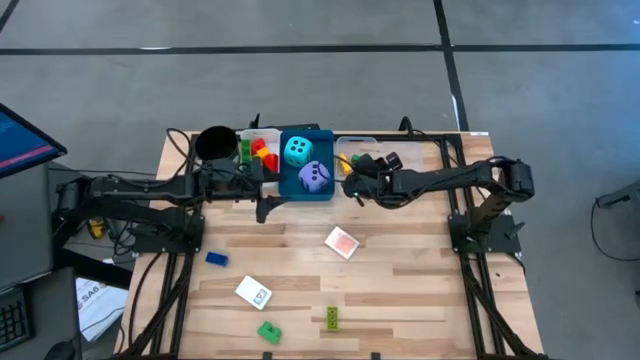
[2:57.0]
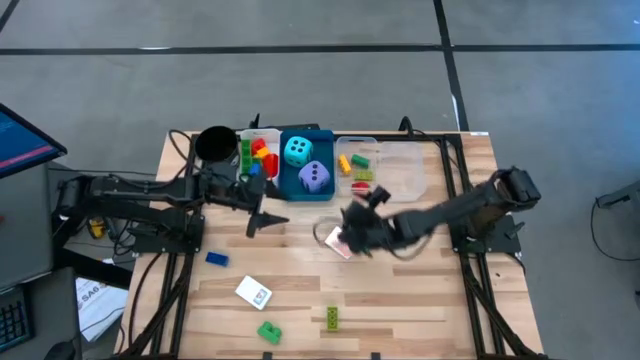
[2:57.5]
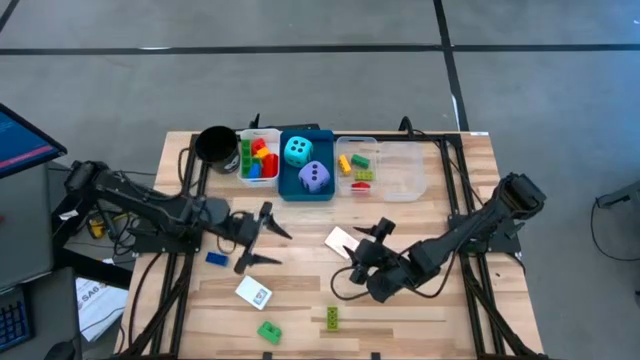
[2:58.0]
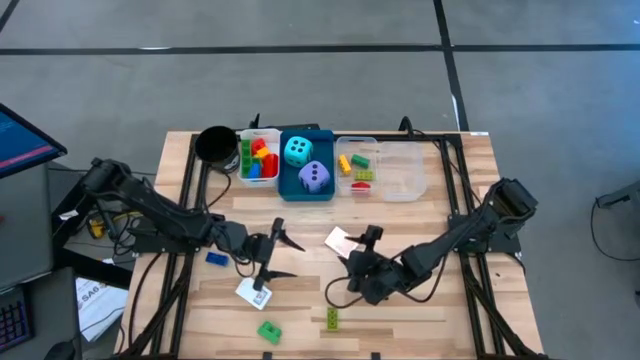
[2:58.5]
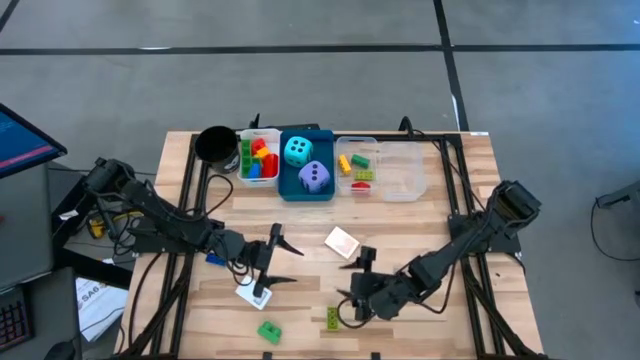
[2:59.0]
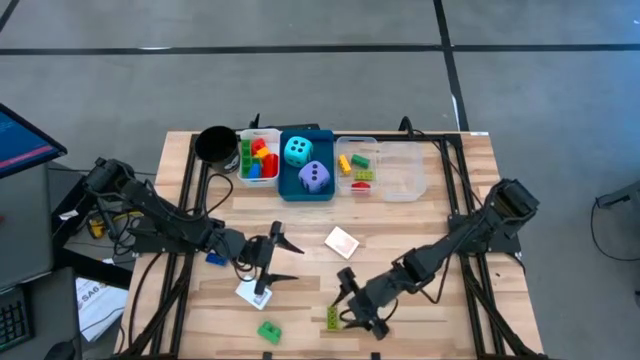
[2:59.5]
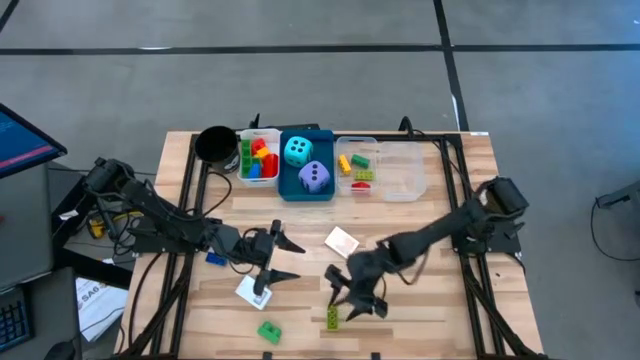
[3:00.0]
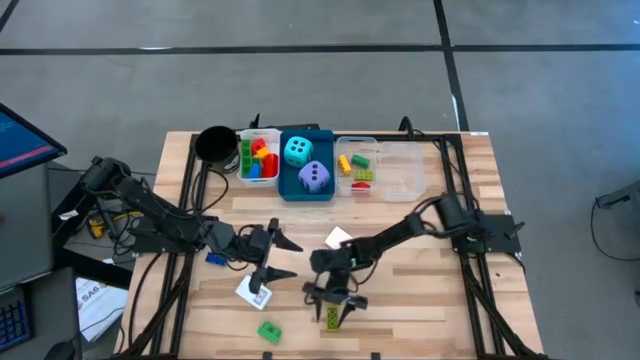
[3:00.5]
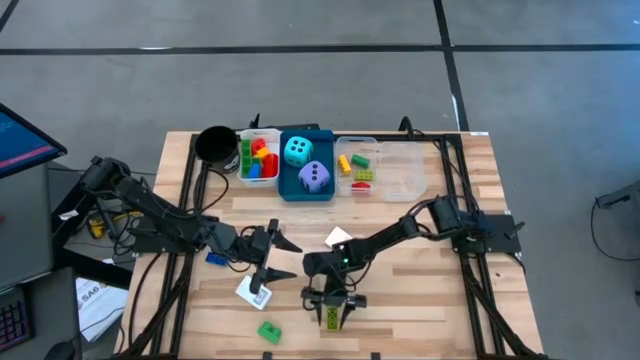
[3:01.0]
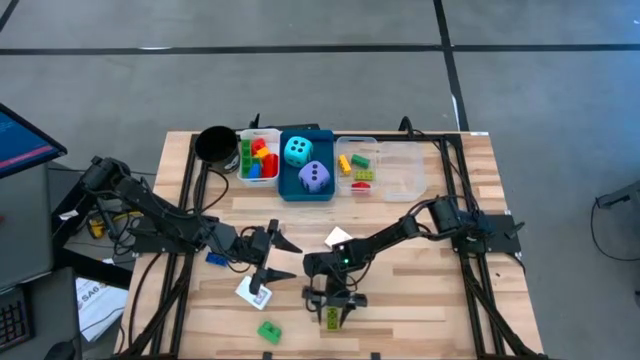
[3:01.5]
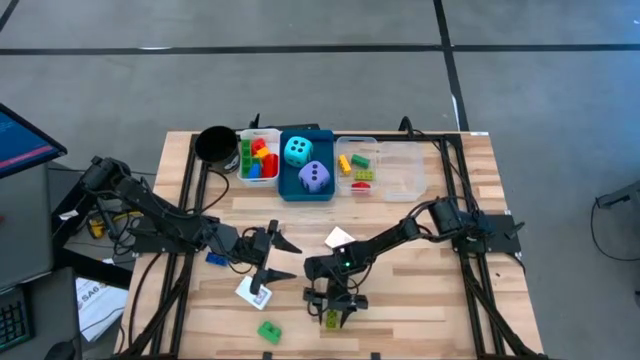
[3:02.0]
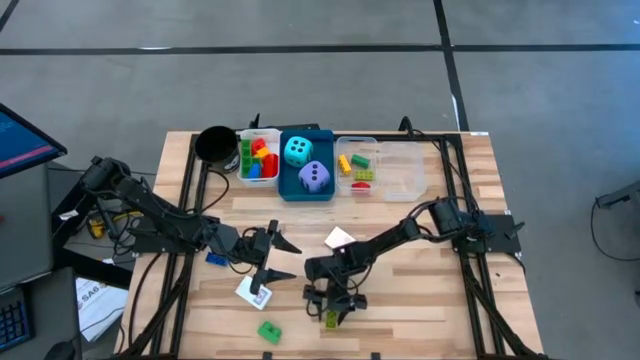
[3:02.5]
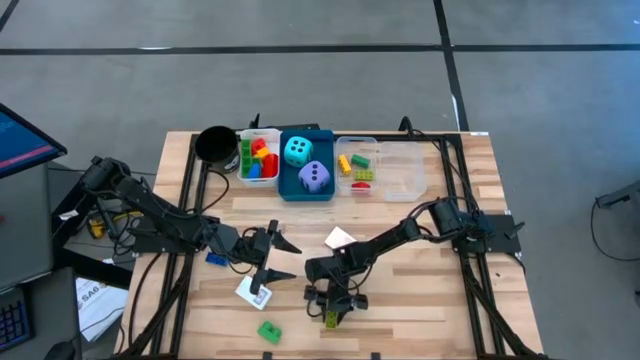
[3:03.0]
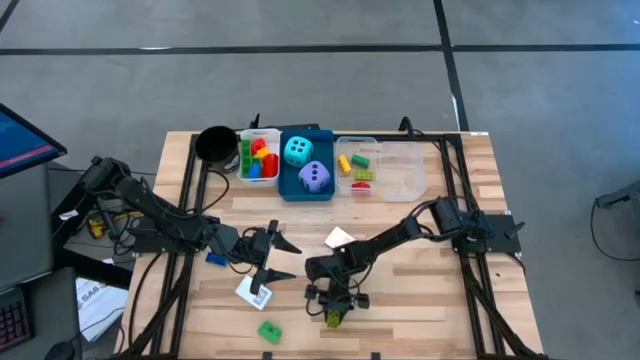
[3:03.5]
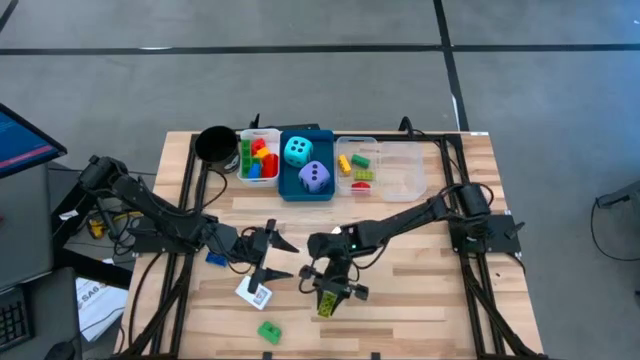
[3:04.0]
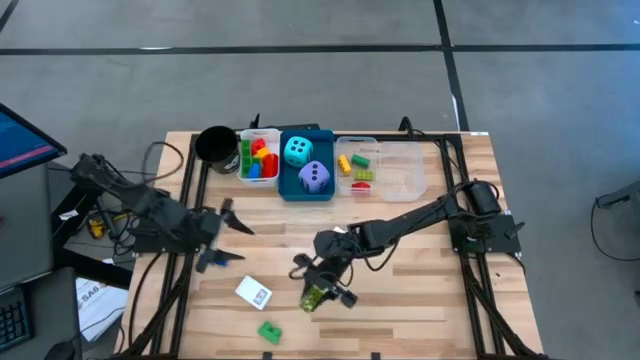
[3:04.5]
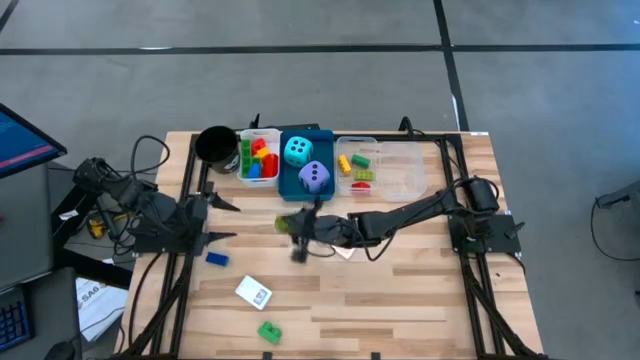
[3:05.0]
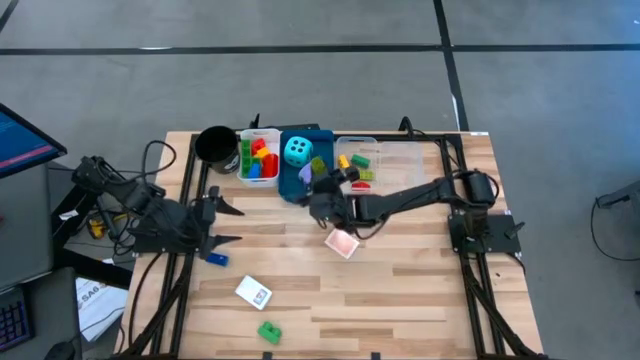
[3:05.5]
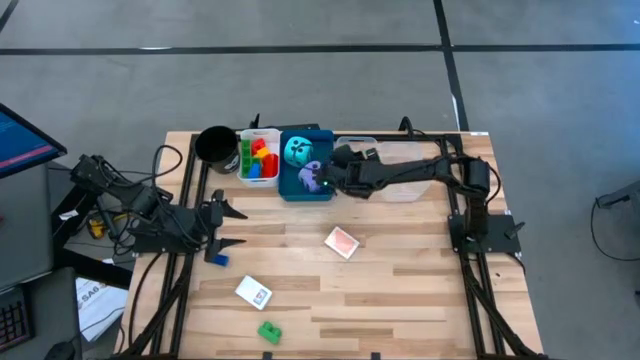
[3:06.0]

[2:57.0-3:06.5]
Task: Pick & Place Toys
Put the small green game piece into the left transparent bin

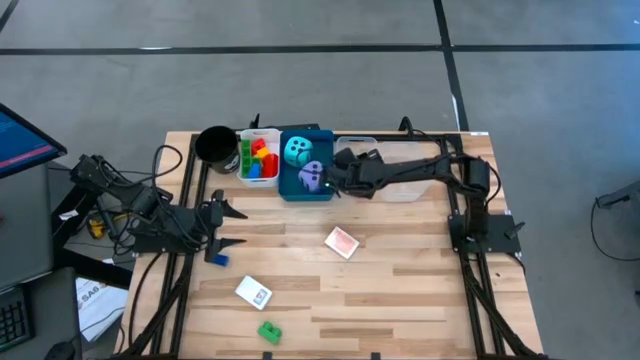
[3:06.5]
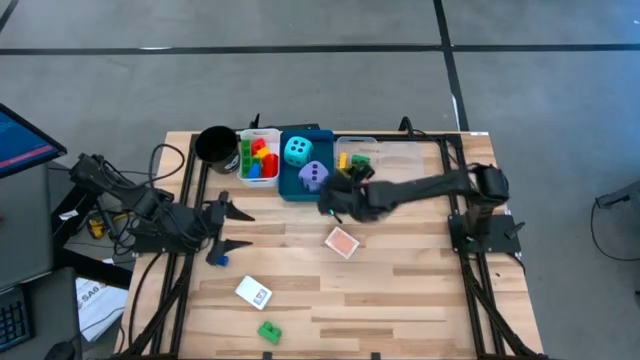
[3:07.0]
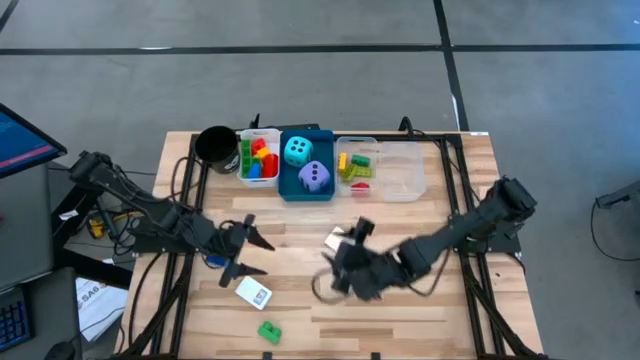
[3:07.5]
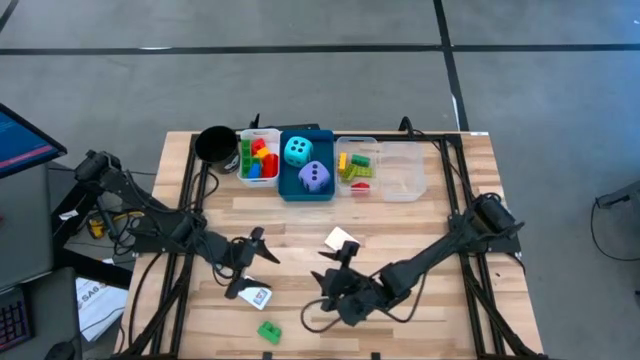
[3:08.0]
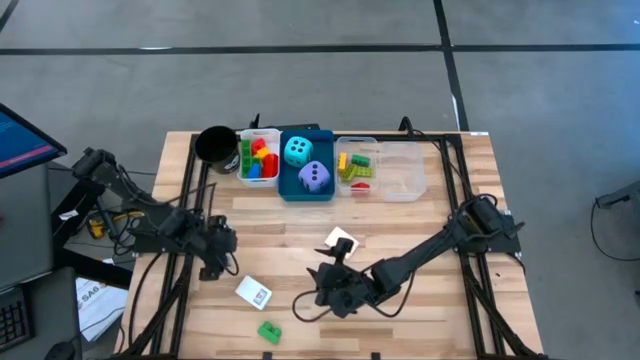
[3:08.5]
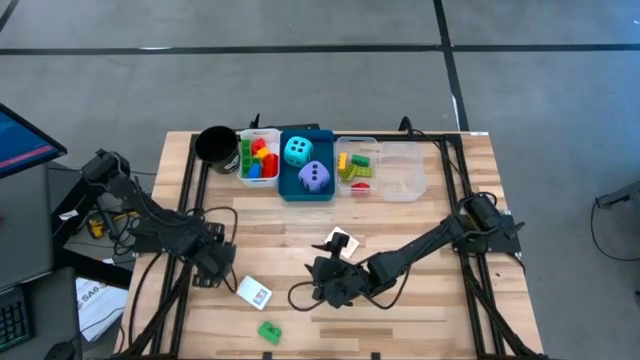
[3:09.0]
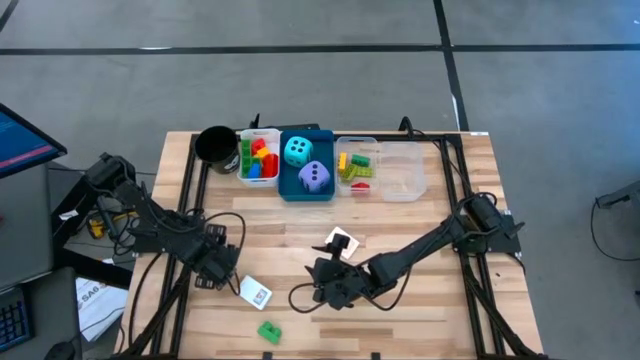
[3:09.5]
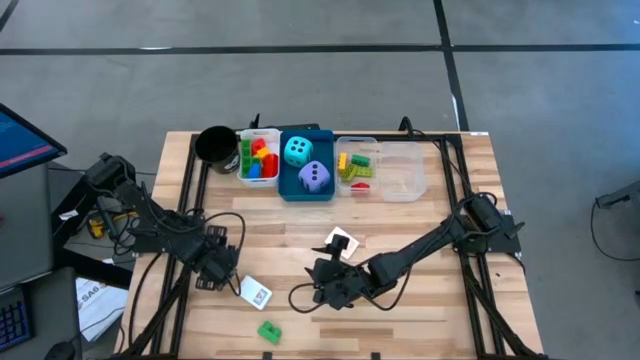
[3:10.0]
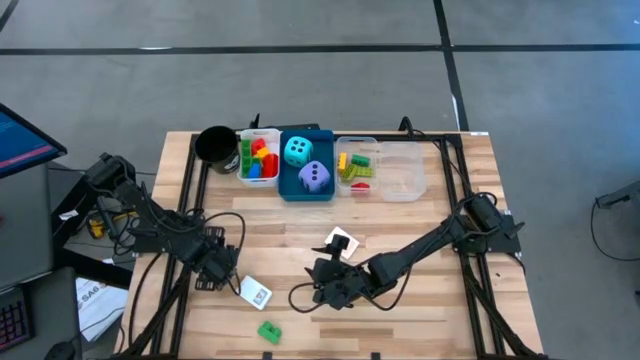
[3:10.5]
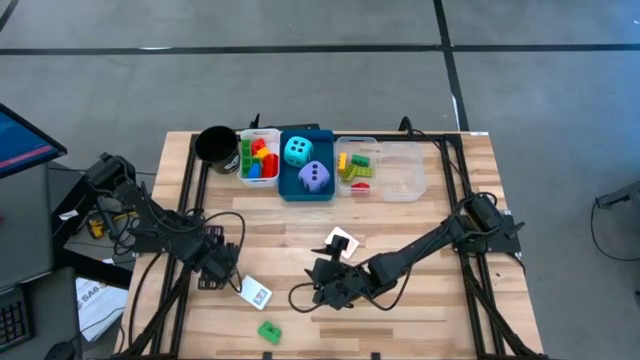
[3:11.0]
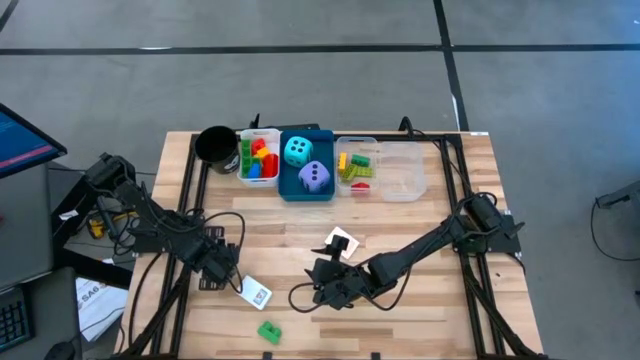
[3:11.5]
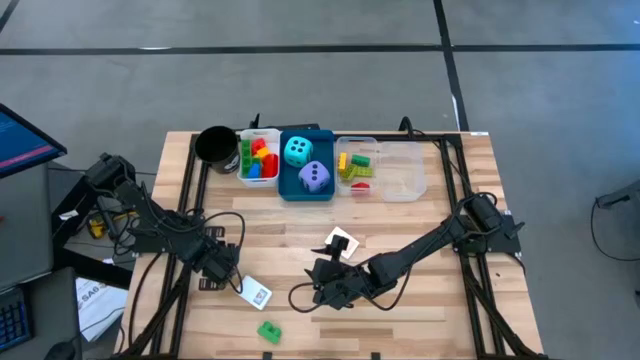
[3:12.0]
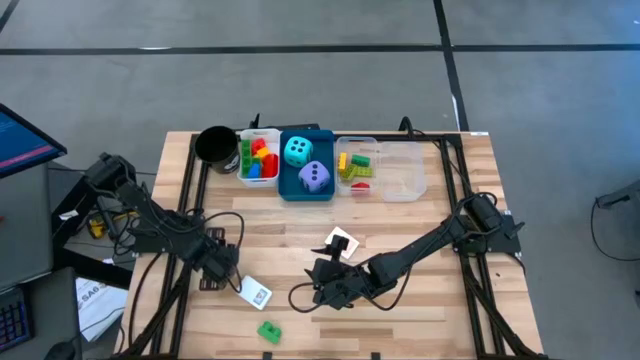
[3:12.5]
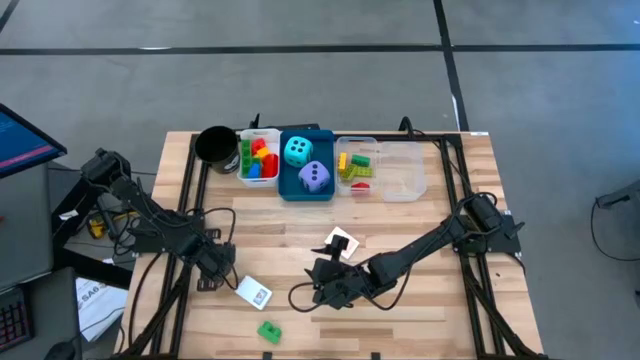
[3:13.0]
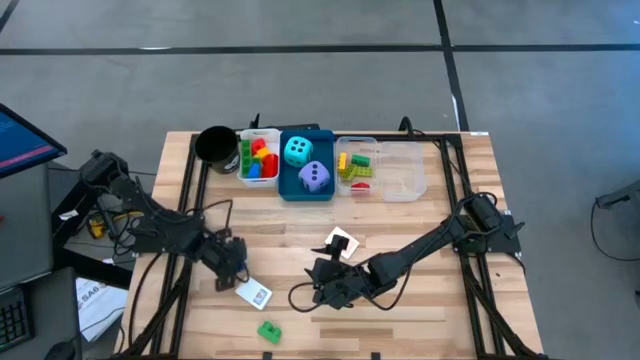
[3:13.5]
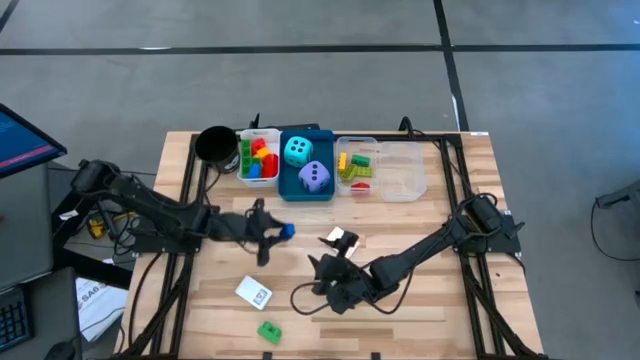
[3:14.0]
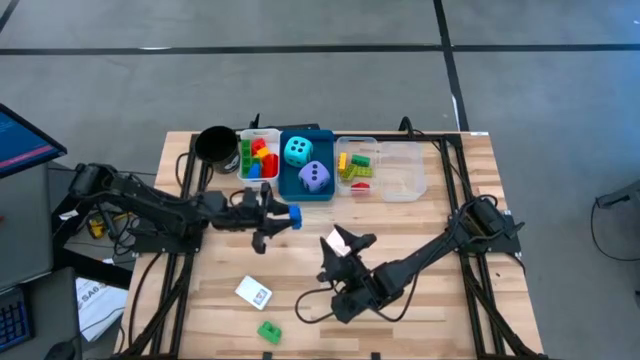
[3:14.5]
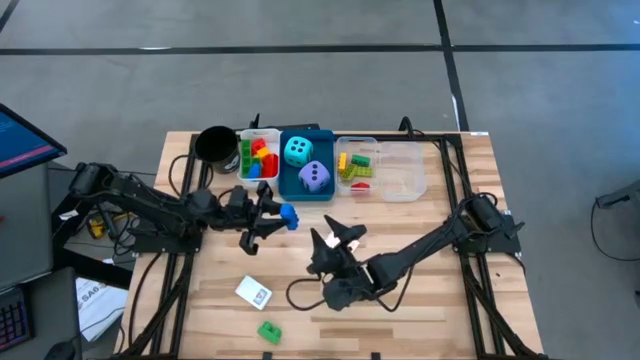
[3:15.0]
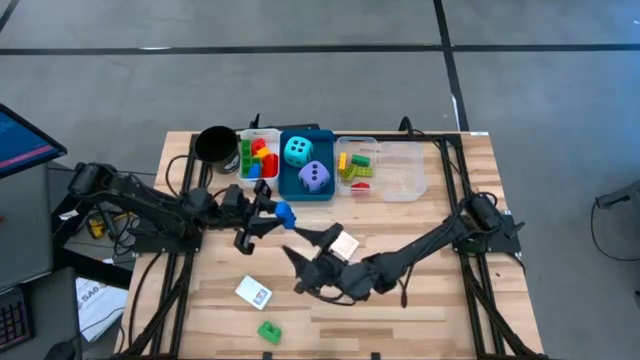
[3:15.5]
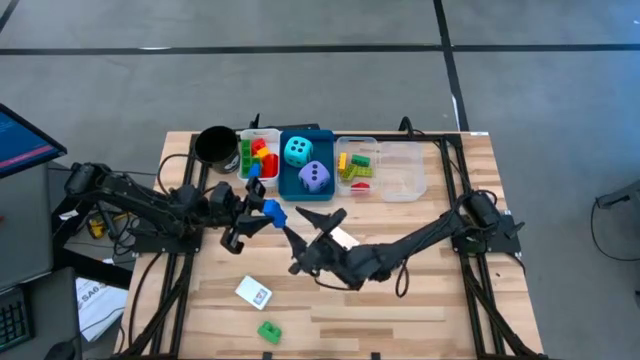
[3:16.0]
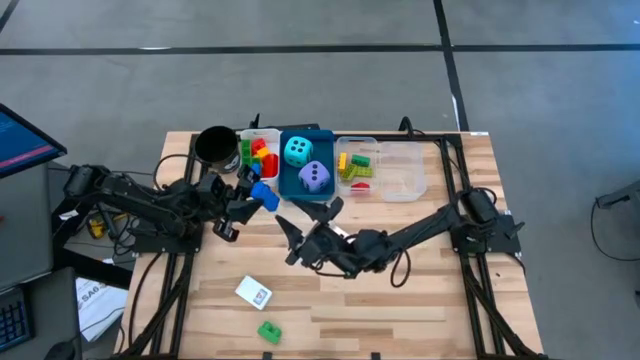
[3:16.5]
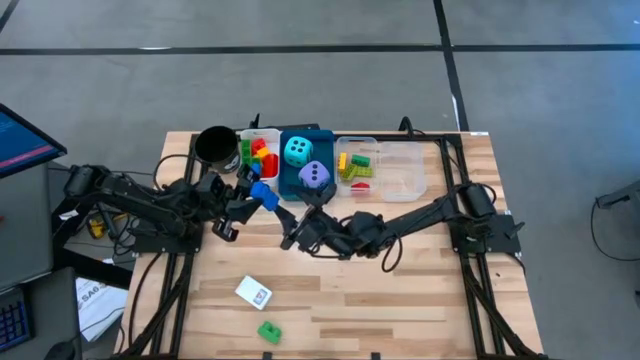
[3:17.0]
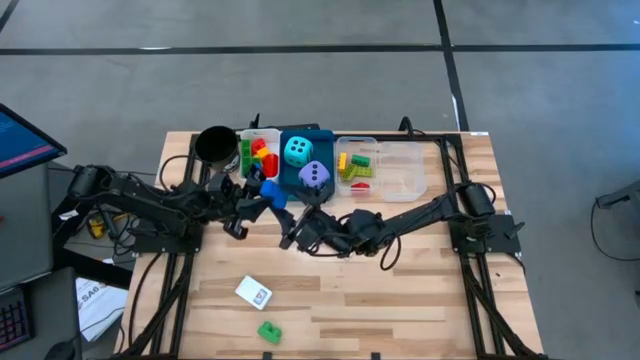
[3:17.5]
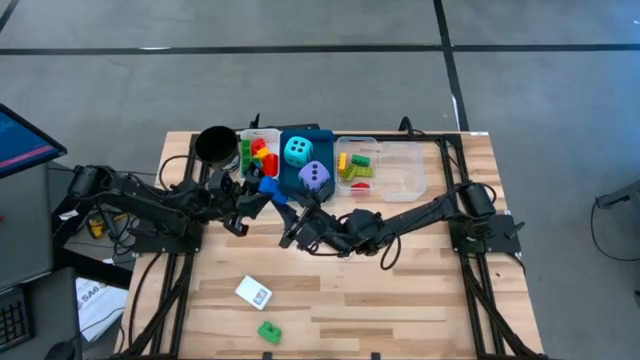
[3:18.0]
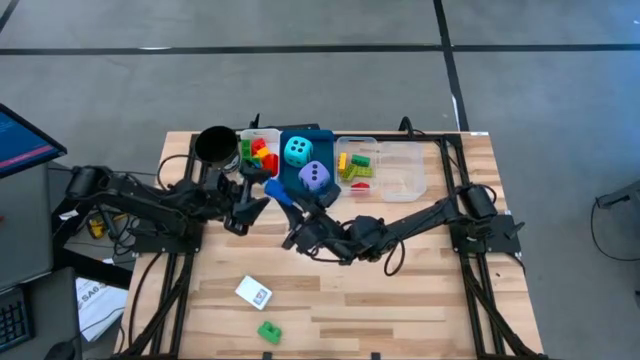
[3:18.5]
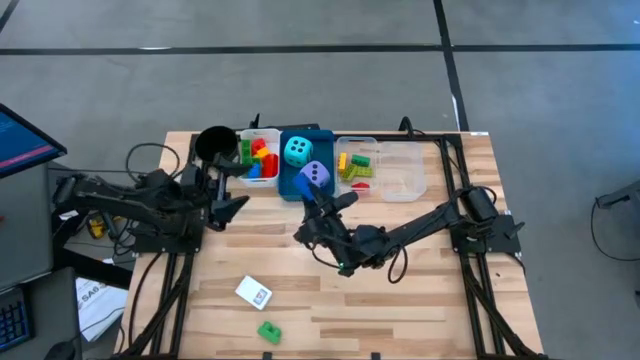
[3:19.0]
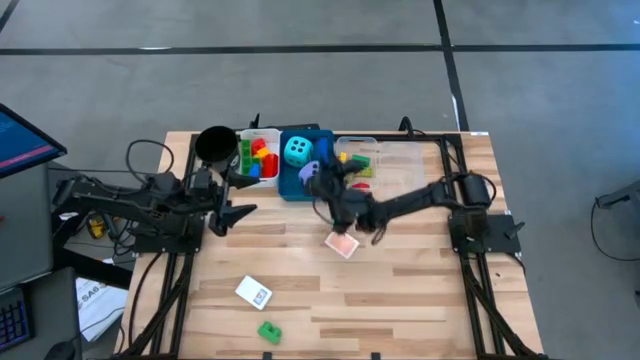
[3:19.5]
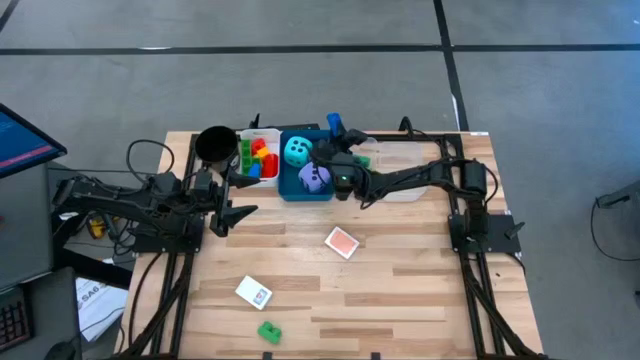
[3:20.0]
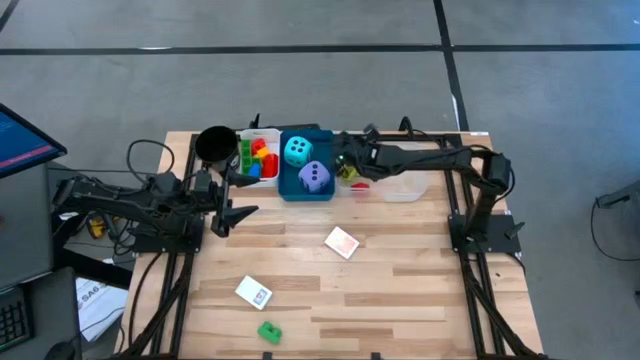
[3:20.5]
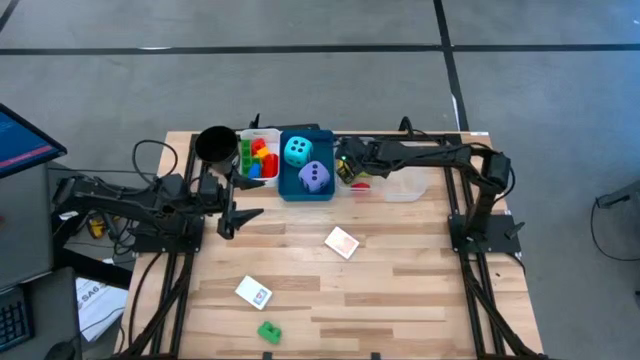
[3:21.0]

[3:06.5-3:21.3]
Put the small blue game piece into the left transparent bin
